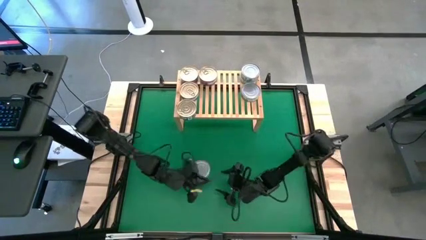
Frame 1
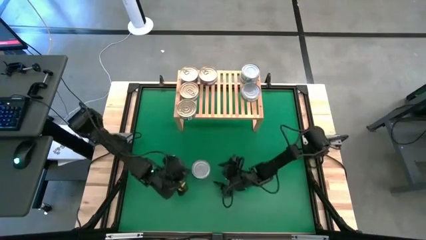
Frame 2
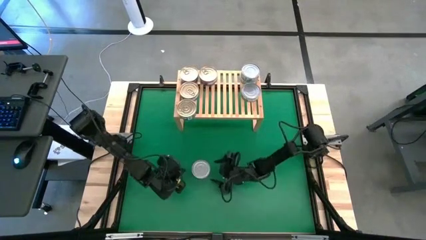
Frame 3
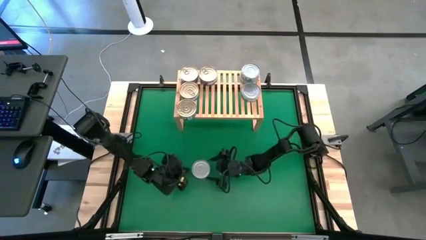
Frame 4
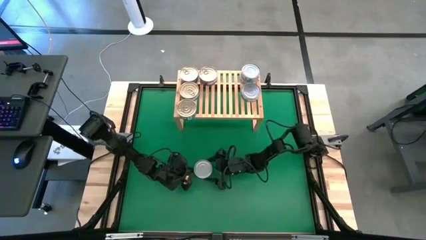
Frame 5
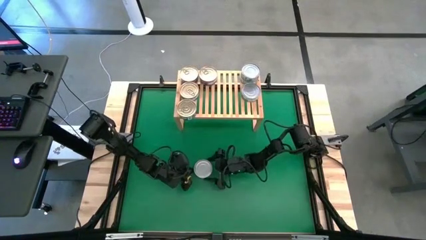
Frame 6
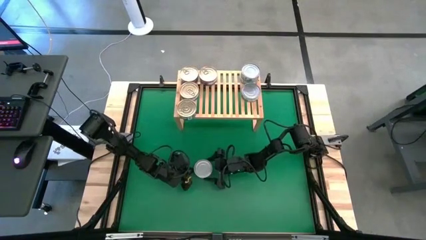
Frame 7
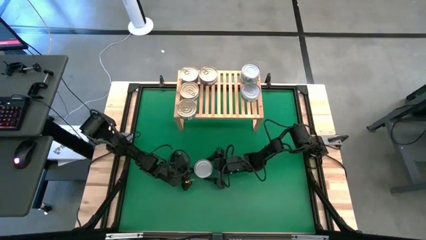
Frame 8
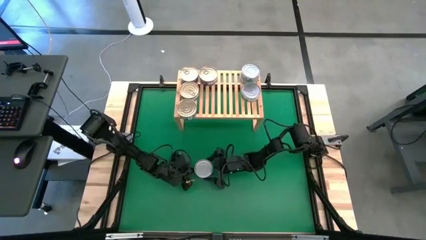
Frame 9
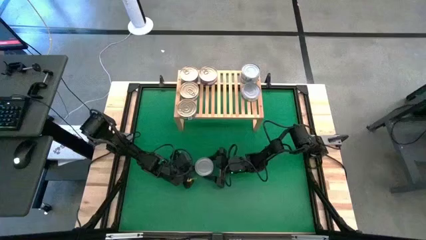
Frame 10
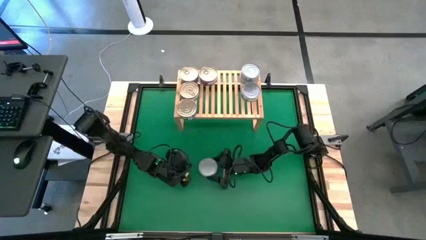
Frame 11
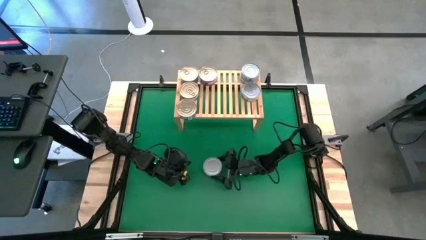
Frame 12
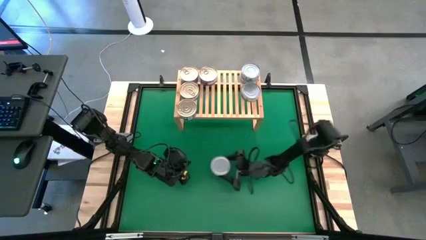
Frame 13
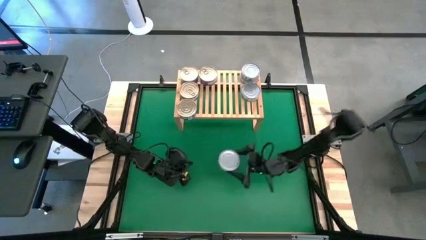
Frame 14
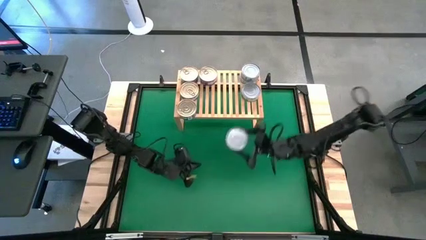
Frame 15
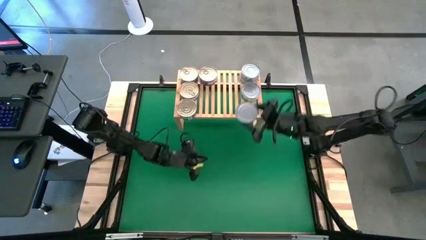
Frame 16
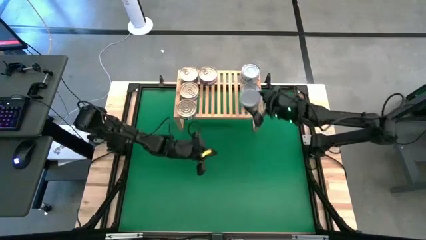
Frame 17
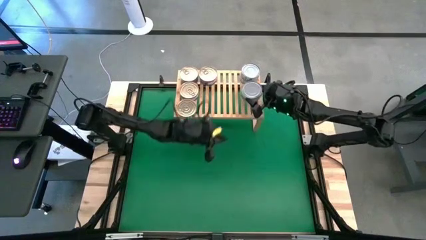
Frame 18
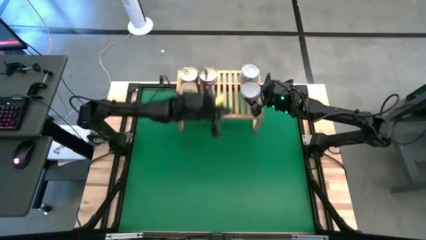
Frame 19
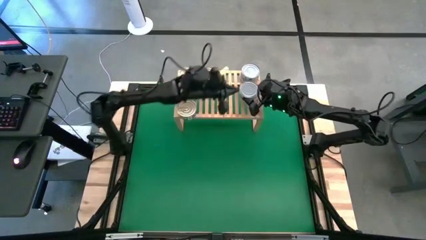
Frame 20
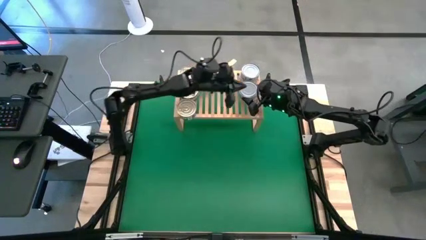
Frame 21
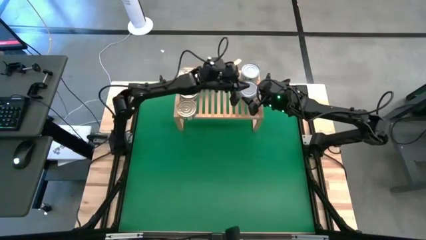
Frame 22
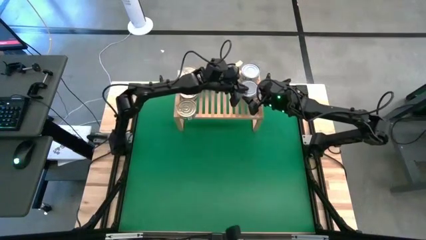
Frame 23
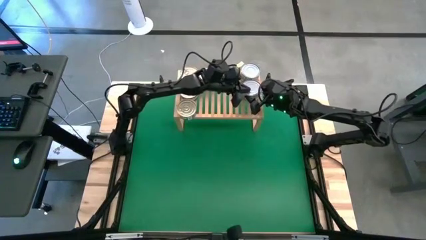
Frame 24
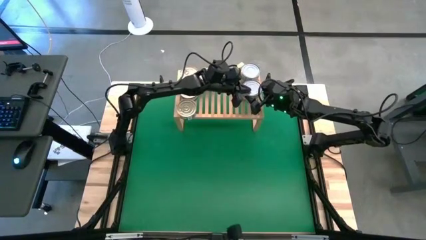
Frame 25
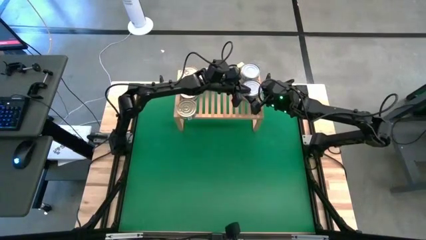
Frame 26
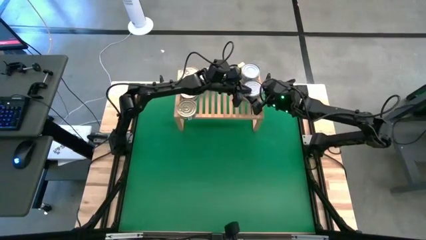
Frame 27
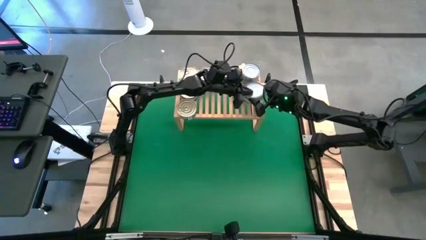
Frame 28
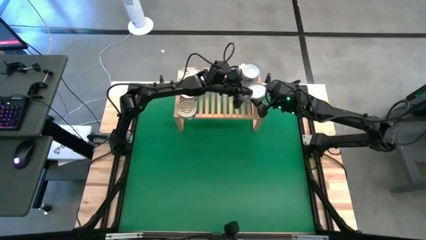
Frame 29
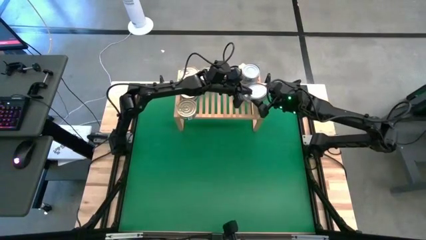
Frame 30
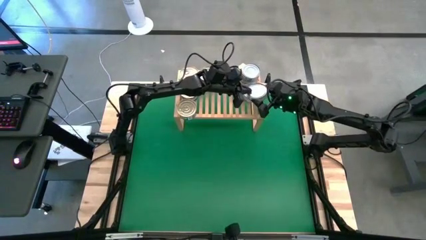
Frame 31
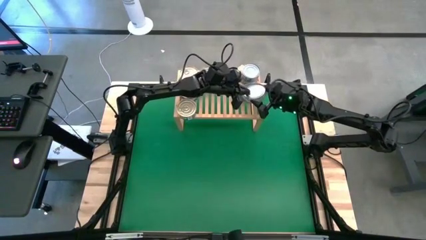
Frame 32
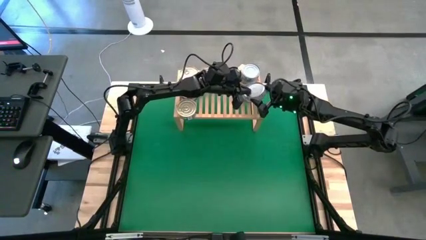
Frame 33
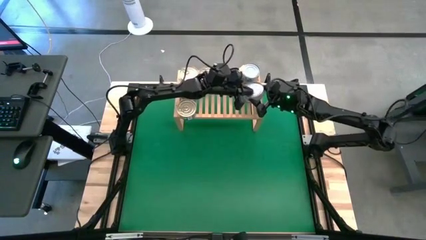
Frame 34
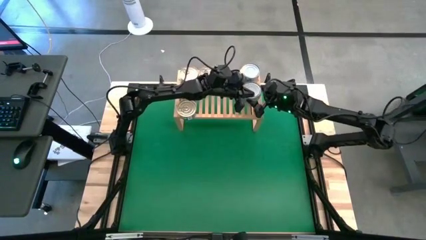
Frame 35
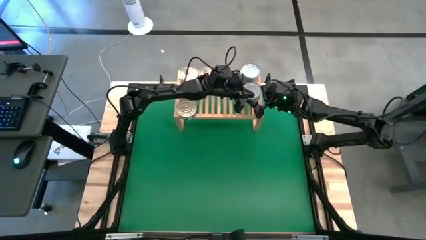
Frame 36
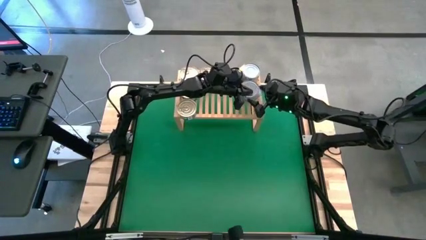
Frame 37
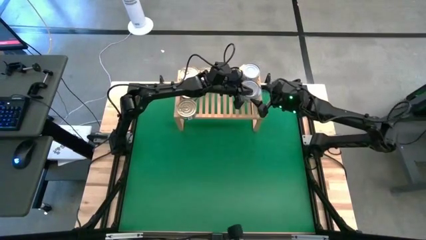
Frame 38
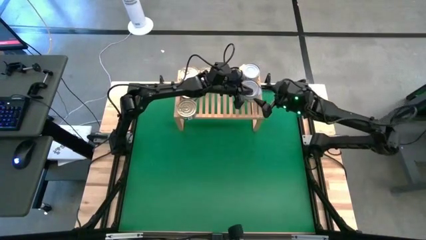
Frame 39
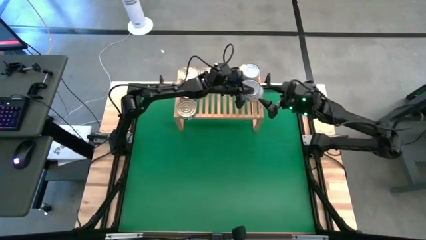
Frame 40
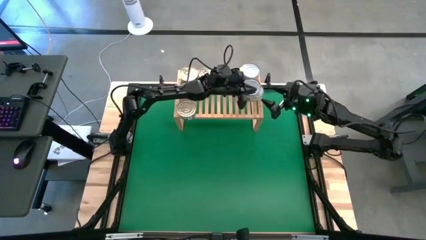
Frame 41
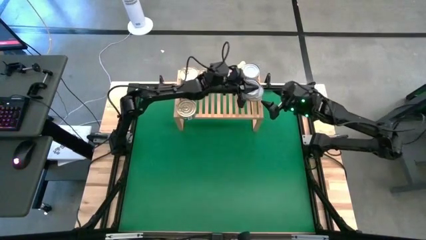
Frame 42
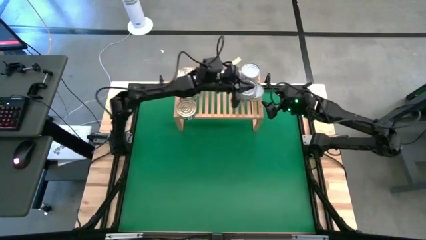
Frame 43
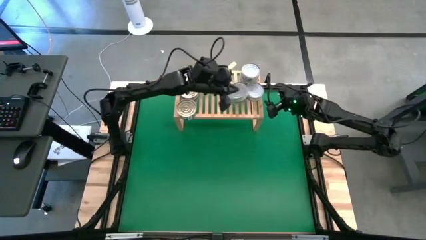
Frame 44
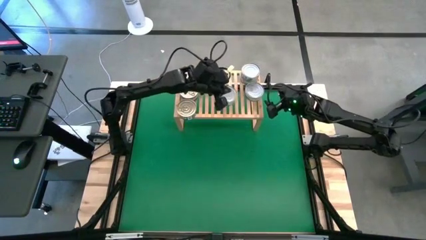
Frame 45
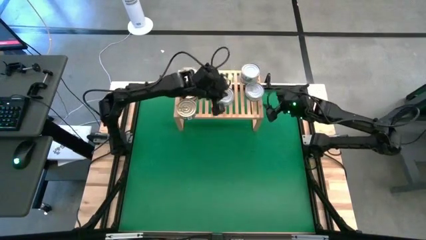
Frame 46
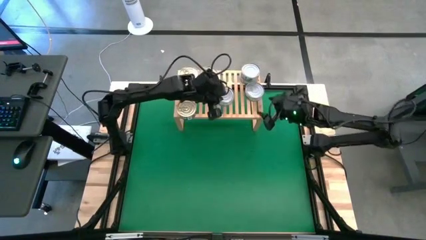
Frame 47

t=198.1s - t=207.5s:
Task: Stack canned seafood by type on shelf
Stack the green tuna can on top of the green tuna can on the shelf

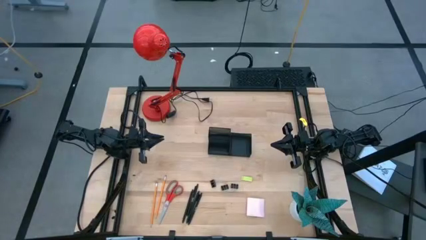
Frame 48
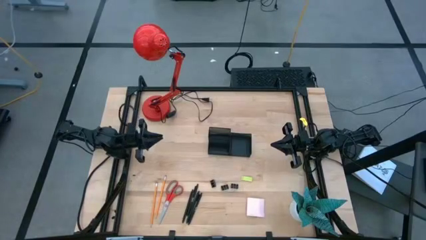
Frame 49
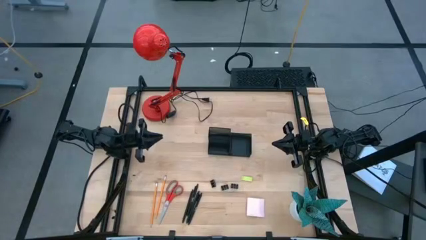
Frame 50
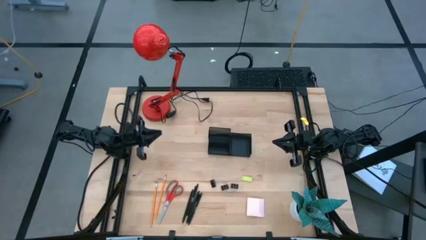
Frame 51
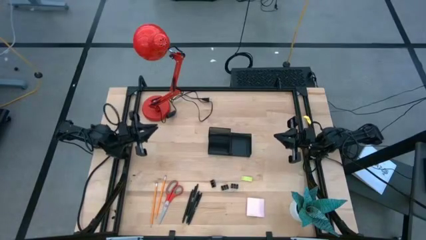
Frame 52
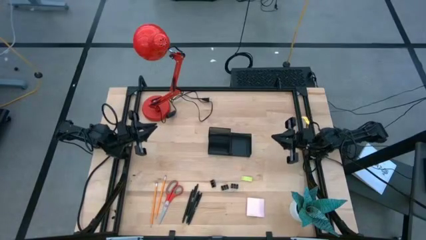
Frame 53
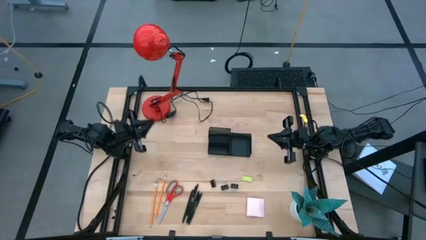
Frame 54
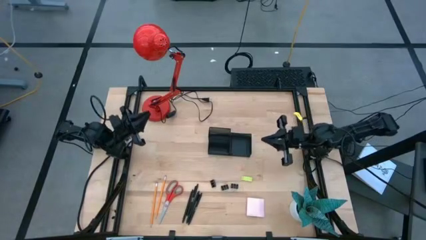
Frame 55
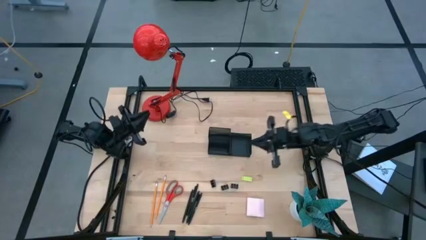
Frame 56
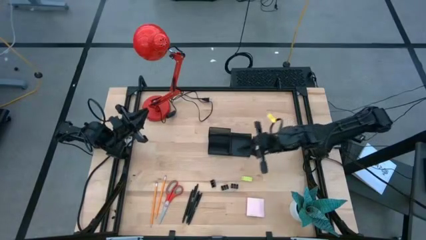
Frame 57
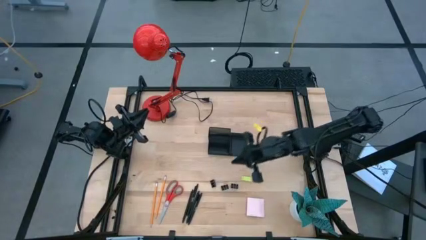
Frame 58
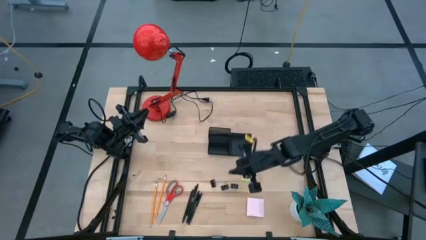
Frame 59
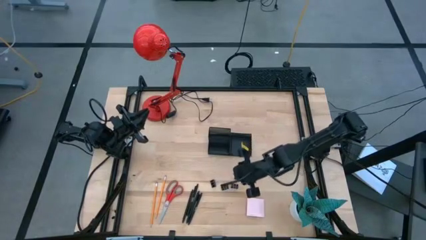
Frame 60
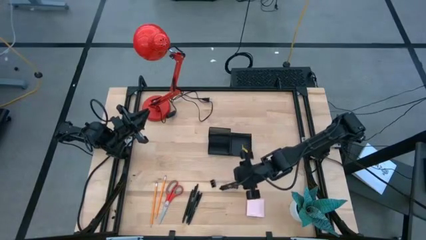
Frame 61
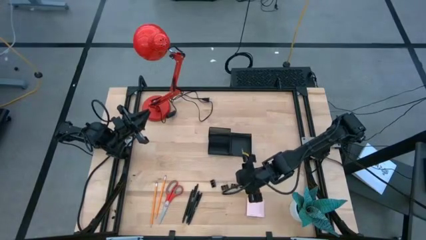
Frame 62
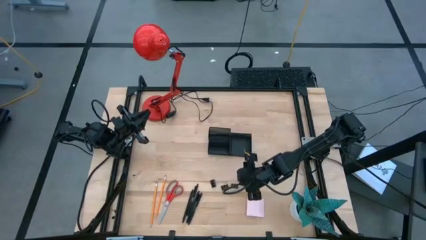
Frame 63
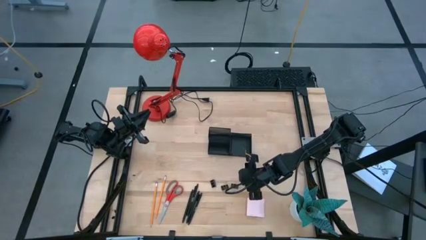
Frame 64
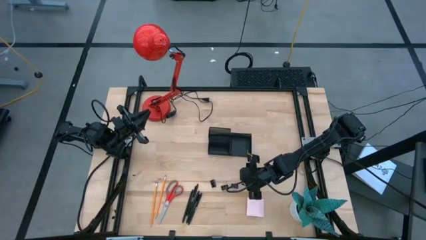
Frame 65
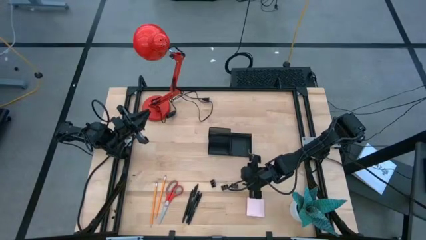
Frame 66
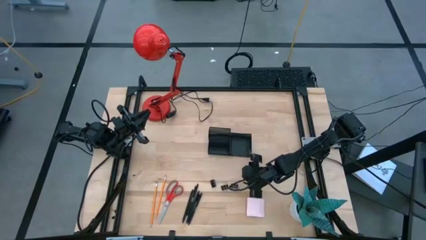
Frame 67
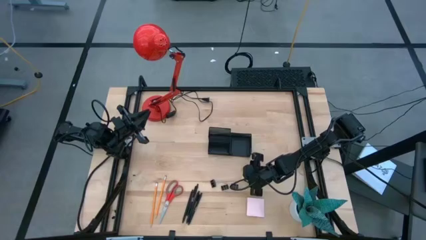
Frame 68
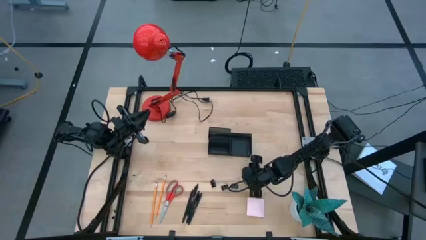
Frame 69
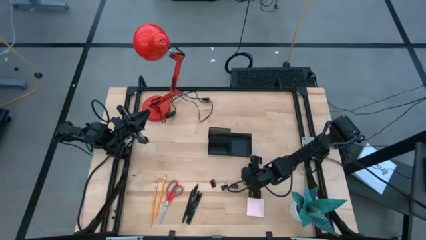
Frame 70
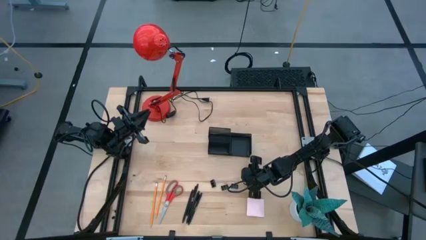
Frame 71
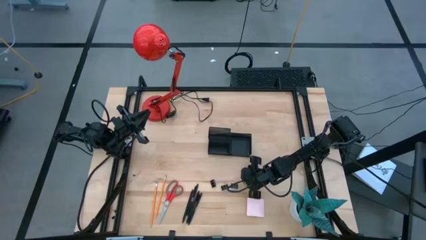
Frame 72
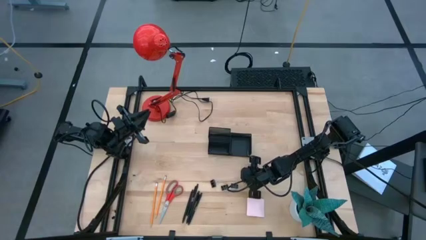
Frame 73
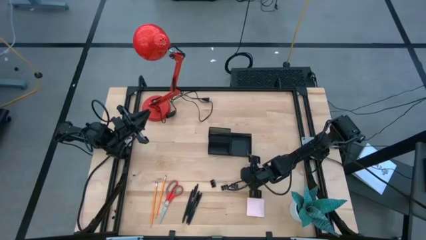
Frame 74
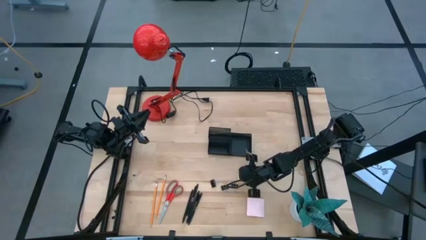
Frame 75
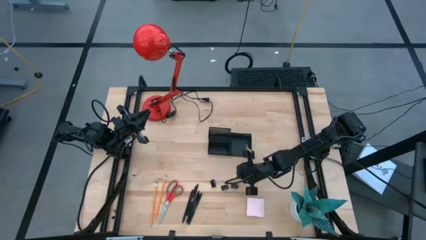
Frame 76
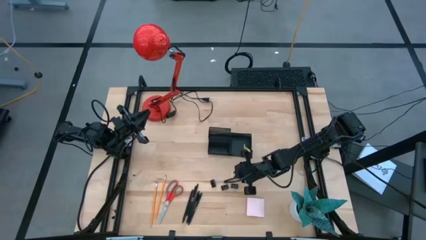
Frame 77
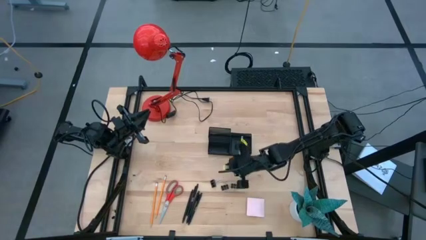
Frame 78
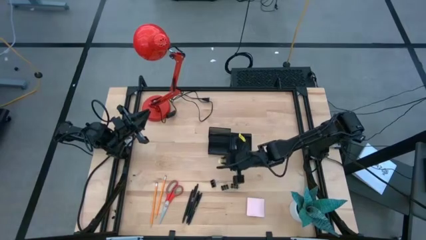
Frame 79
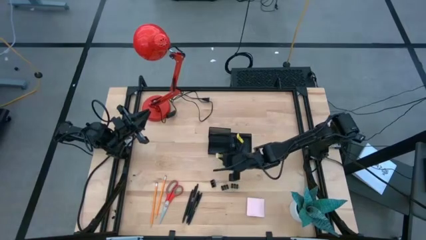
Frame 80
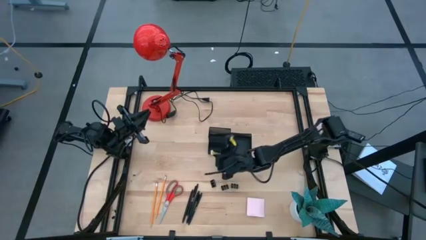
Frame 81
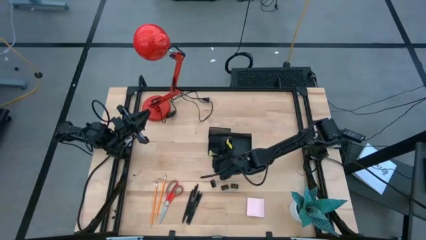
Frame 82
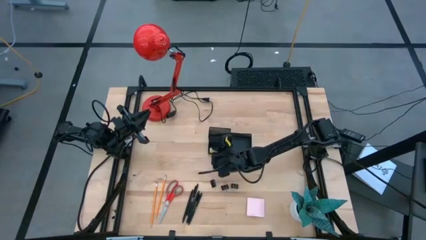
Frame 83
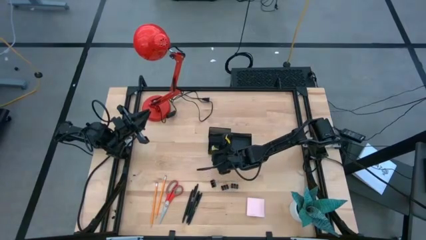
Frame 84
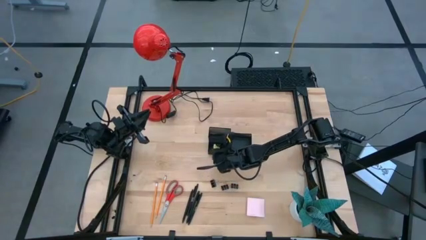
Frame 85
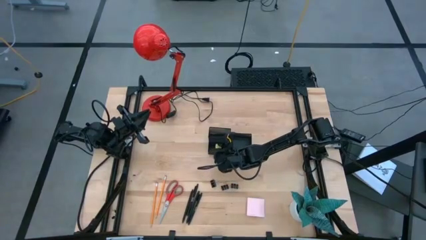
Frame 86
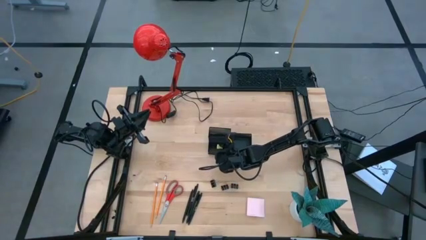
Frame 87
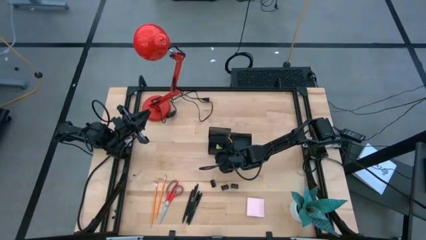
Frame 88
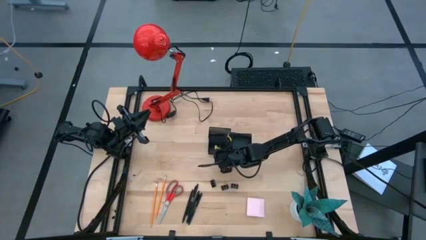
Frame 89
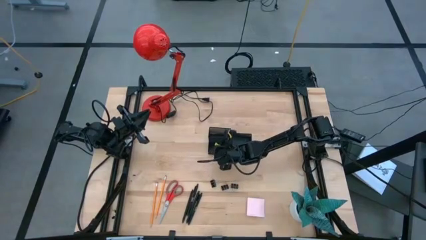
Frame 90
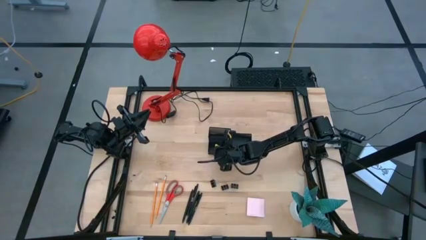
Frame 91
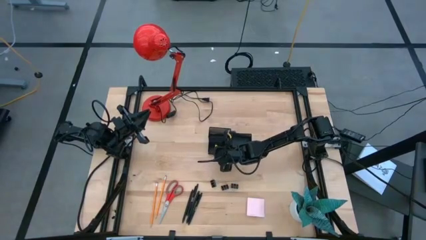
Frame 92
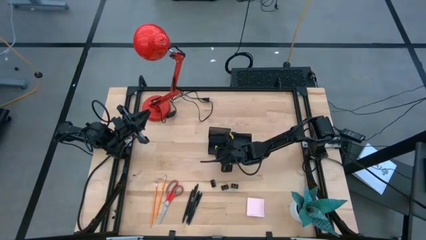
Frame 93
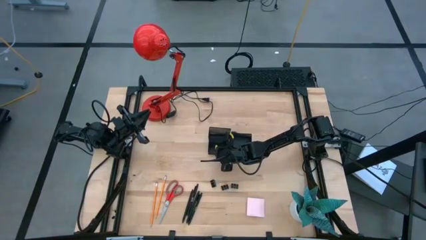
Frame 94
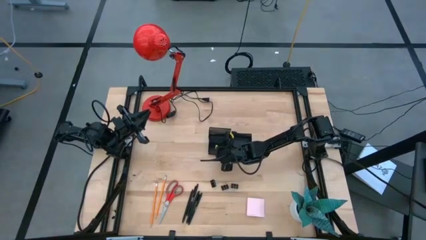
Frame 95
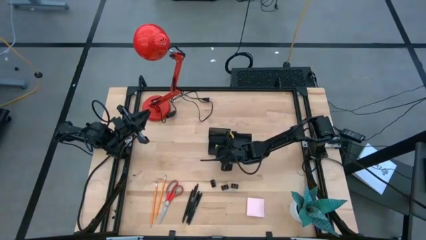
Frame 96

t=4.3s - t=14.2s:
Task: Pick and place office supplies into organizer
Put the green eraser into the black desk organizer
